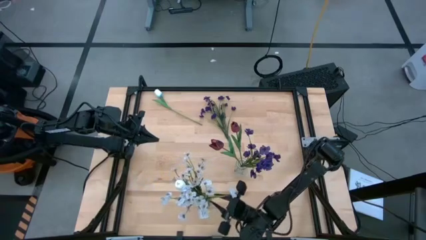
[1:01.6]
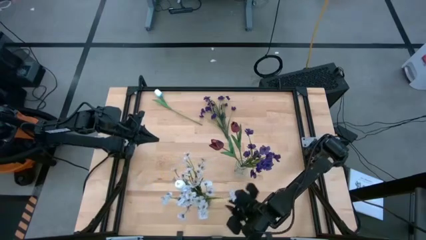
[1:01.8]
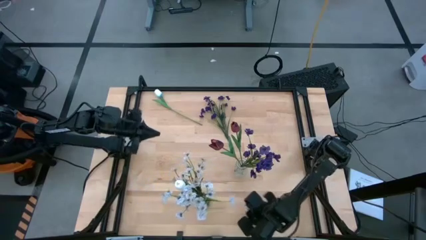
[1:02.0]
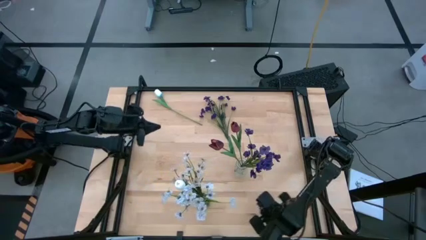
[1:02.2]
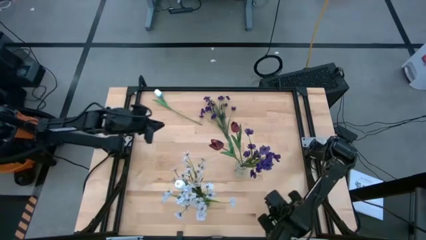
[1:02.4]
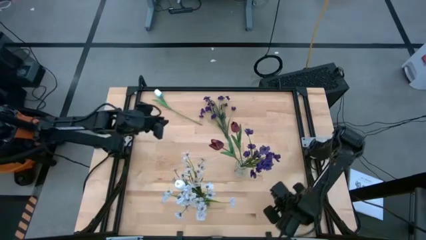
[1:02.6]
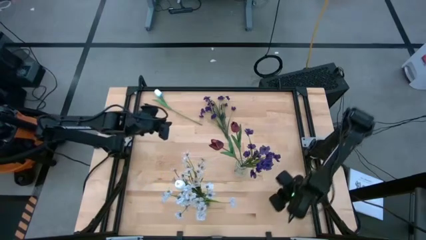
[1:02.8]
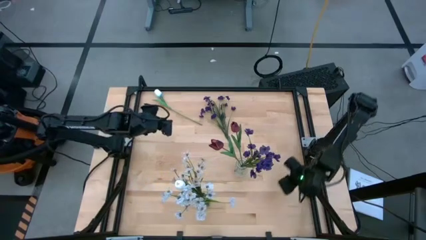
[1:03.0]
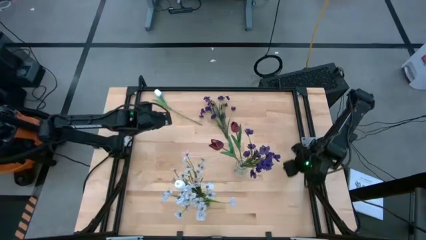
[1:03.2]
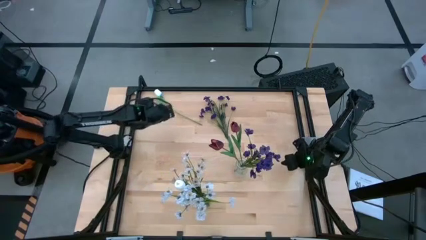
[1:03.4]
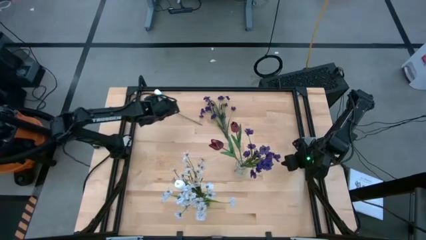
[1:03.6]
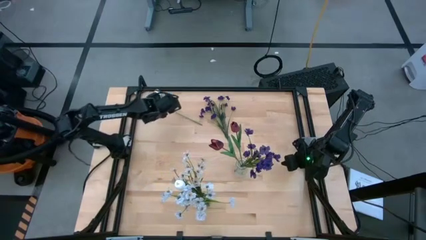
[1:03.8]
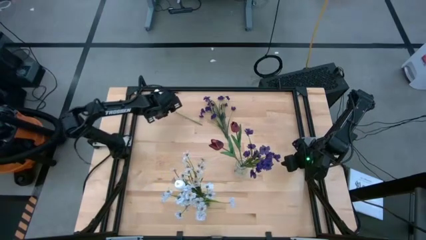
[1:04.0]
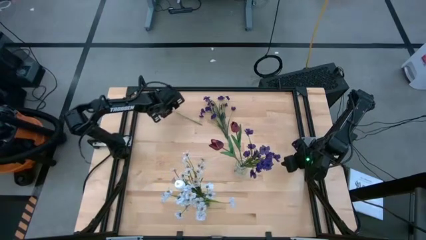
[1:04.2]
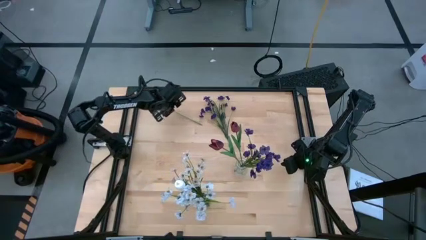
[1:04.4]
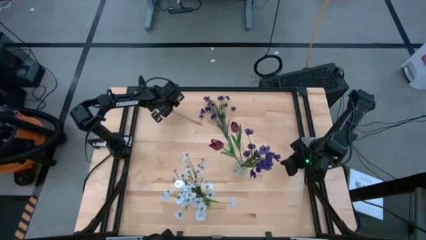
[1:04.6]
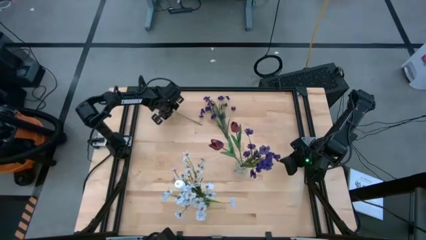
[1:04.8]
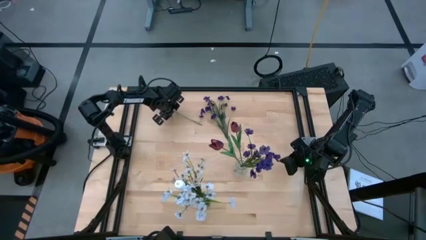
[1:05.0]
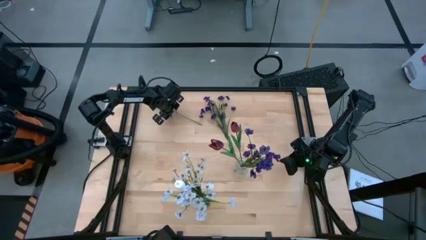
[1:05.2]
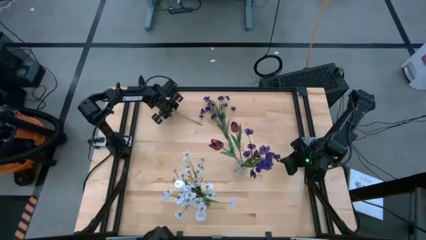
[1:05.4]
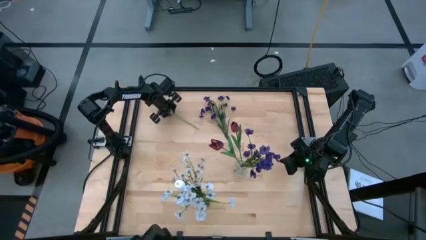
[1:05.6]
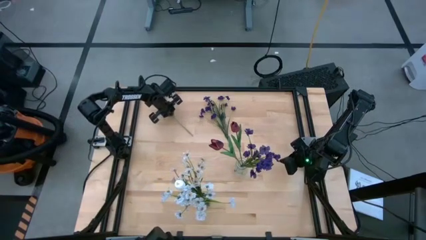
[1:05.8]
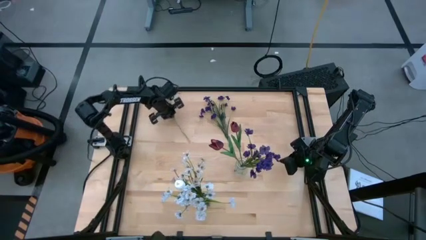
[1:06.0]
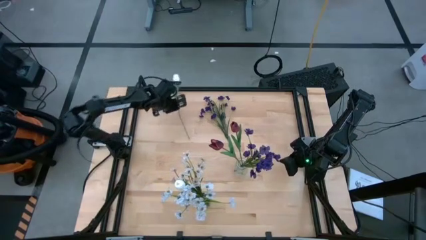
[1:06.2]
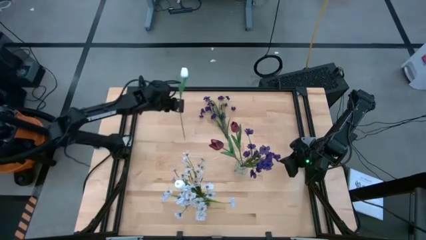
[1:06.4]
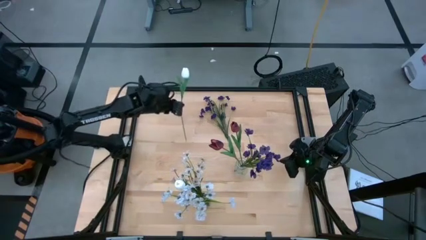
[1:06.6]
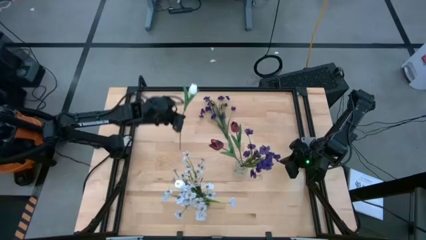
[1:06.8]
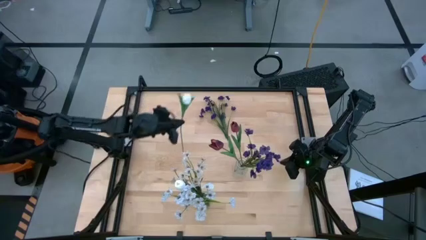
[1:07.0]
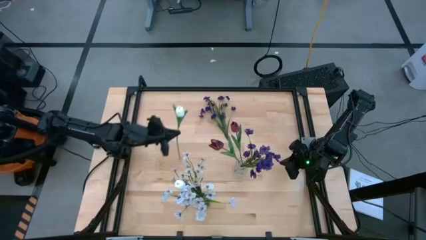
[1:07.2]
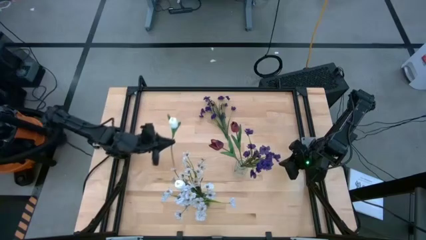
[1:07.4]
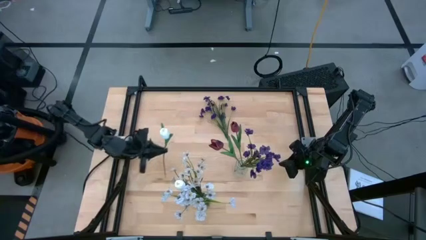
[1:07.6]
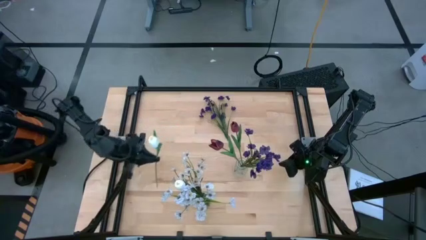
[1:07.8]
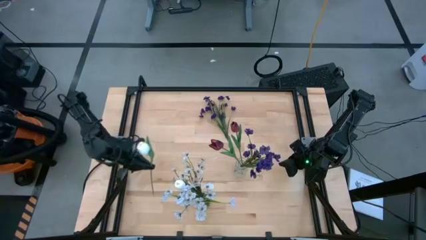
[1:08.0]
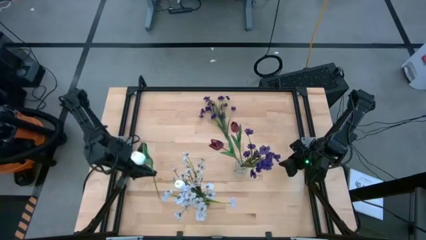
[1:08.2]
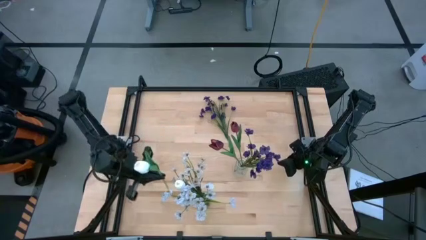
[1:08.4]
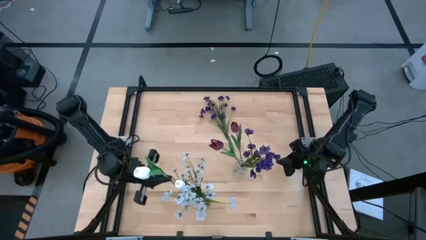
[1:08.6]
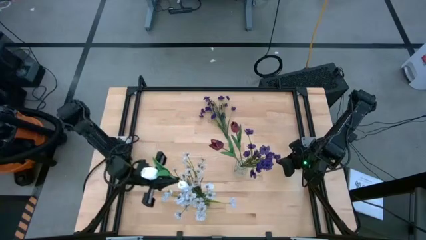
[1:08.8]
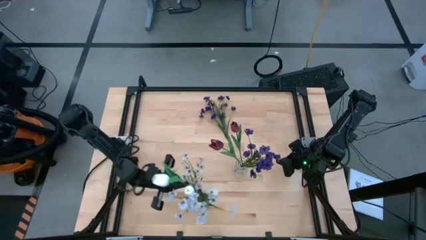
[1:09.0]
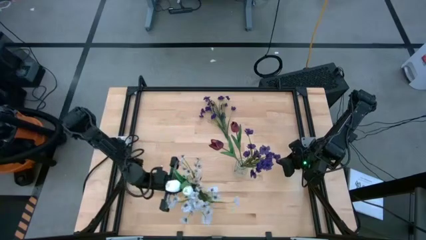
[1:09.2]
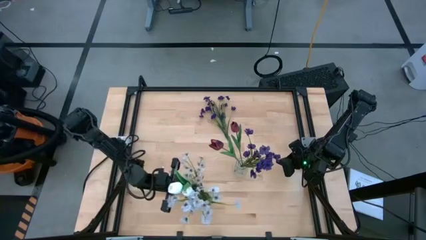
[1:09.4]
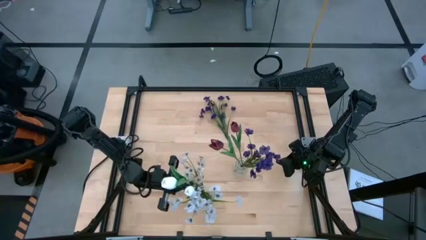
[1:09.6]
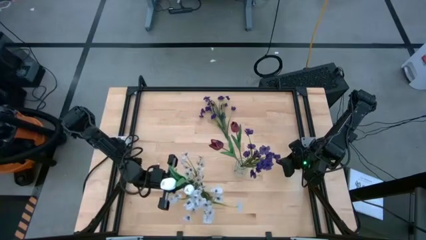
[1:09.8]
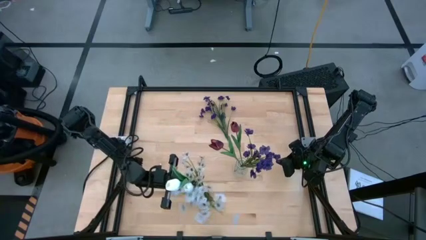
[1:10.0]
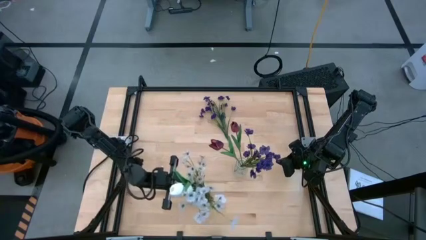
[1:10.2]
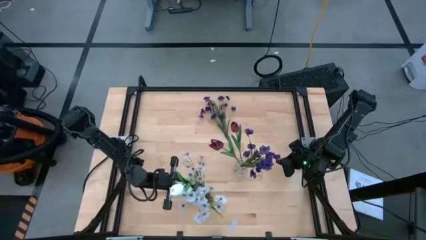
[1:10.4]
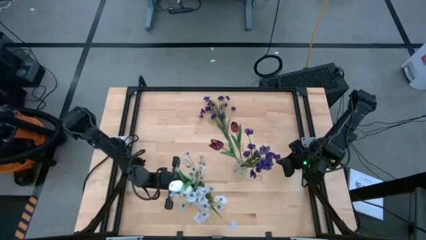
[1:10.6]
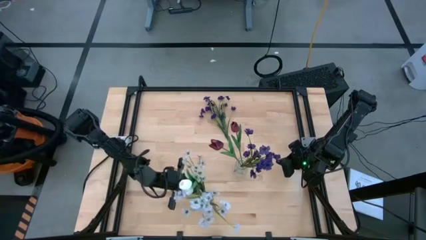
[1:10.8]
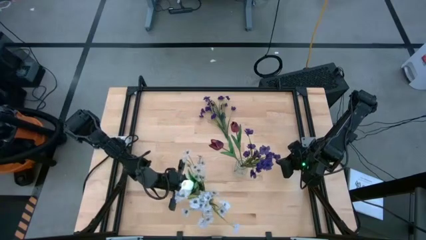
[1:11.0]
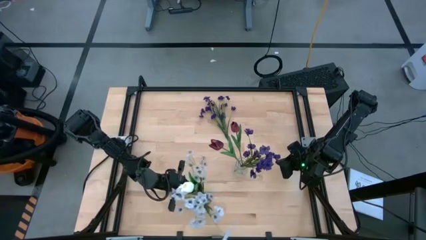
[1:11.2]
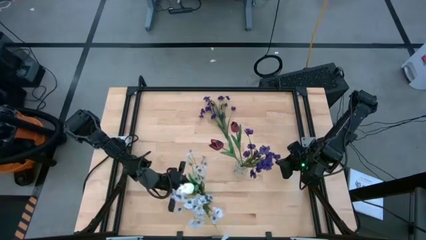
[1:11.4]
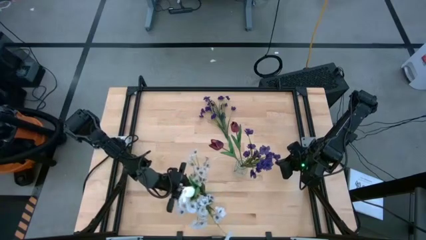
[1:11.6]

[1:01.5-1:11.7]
Task: Sort flowers into vase by color
Put the white tulip into the green vase
